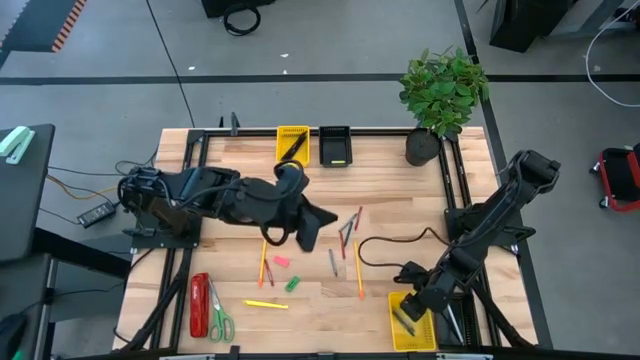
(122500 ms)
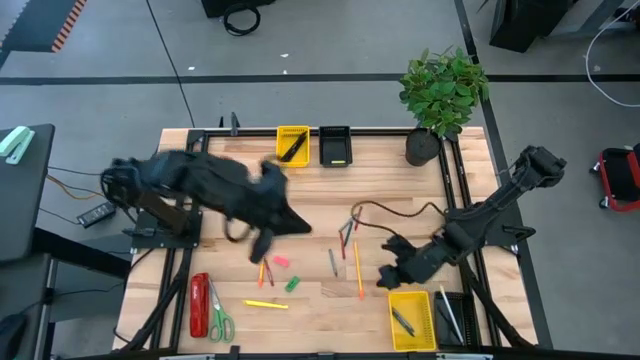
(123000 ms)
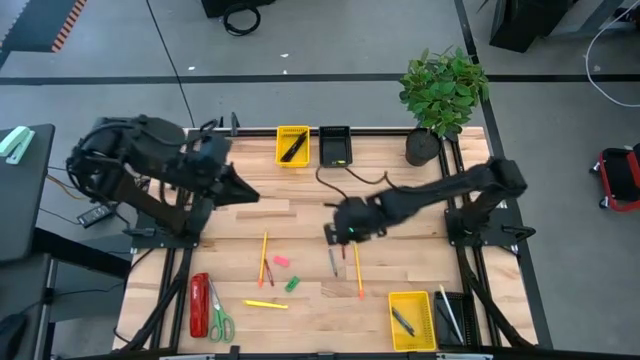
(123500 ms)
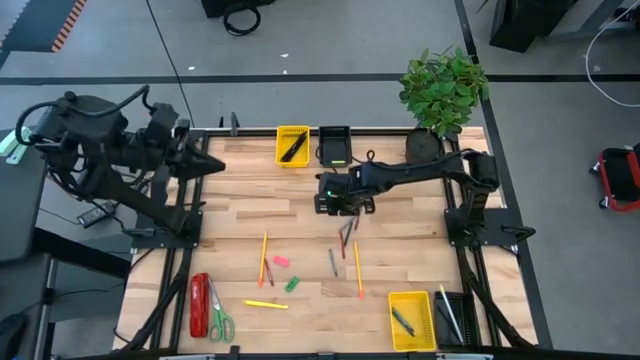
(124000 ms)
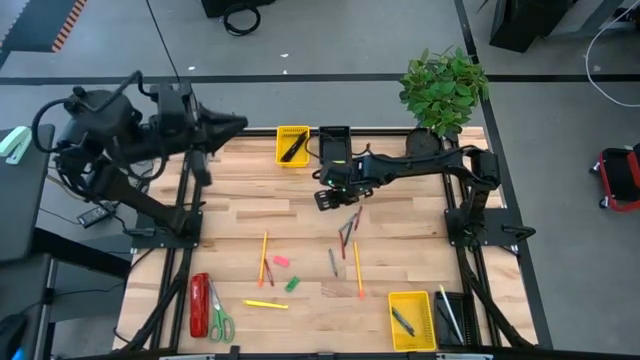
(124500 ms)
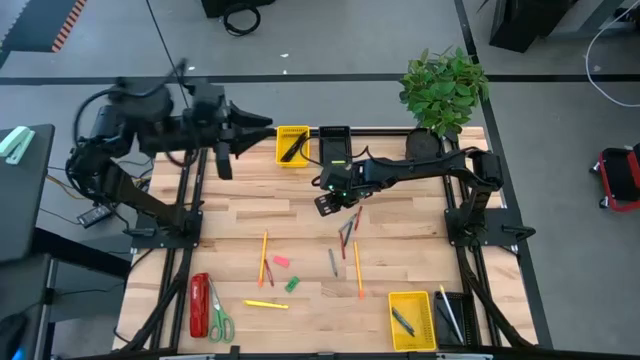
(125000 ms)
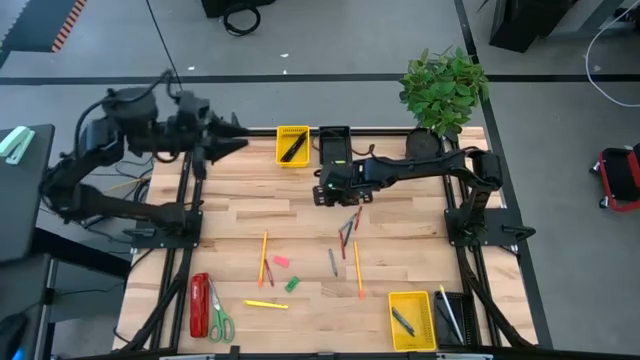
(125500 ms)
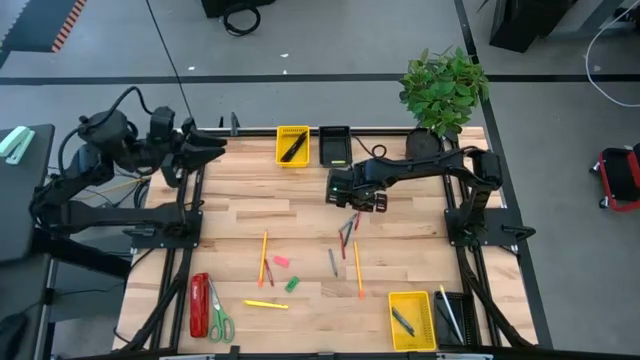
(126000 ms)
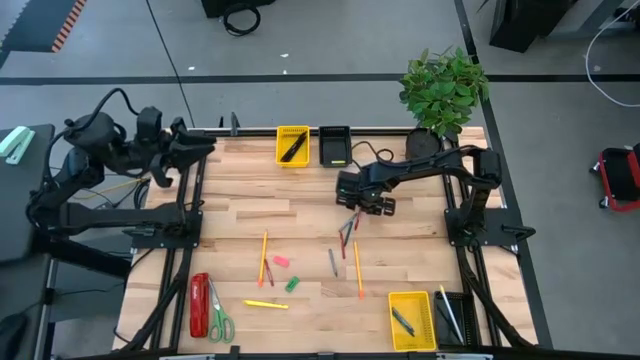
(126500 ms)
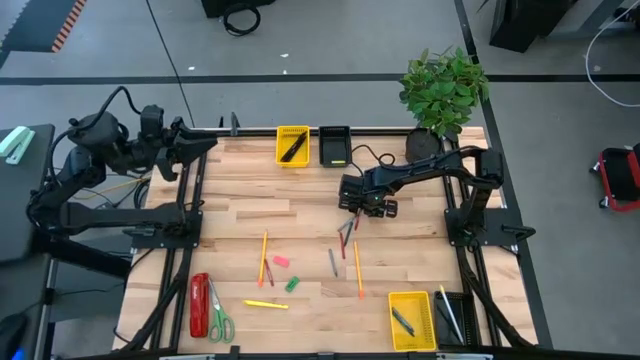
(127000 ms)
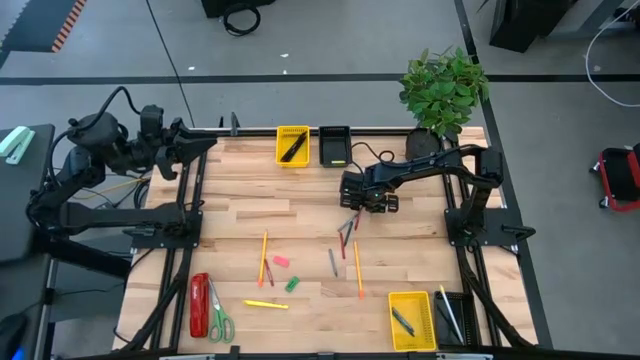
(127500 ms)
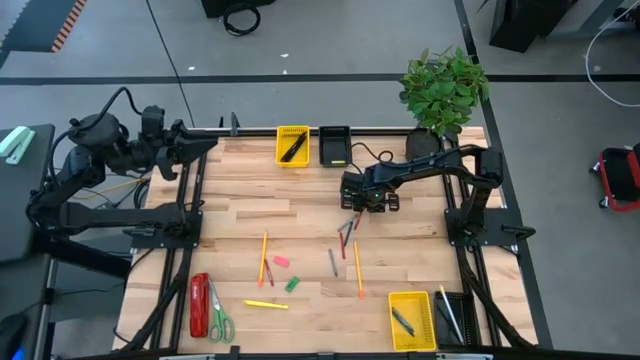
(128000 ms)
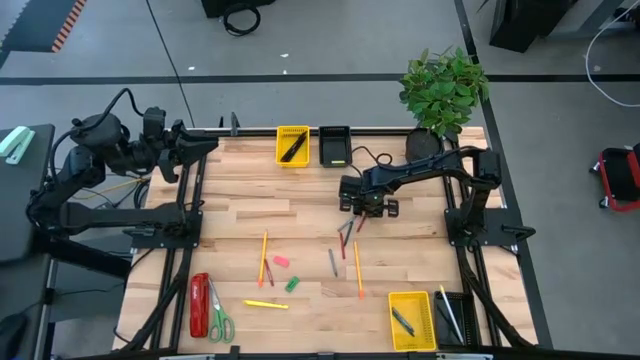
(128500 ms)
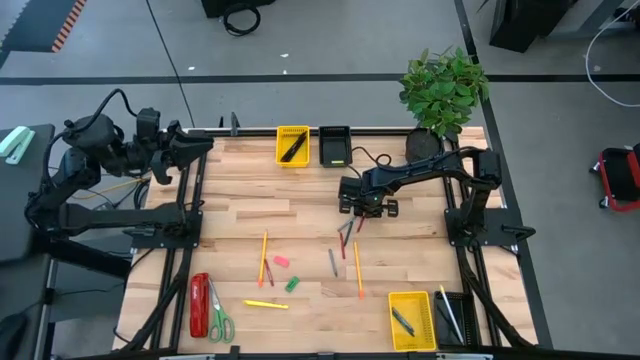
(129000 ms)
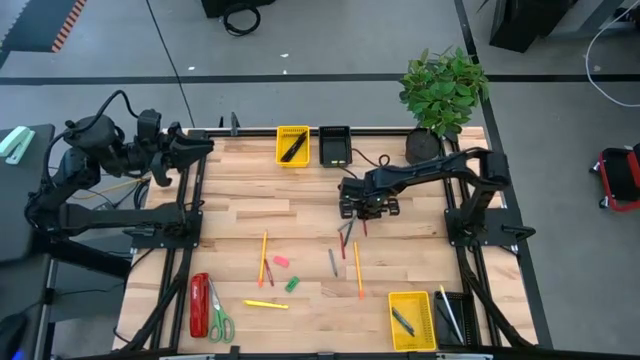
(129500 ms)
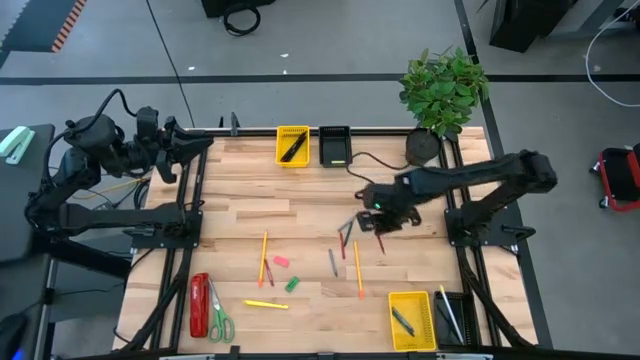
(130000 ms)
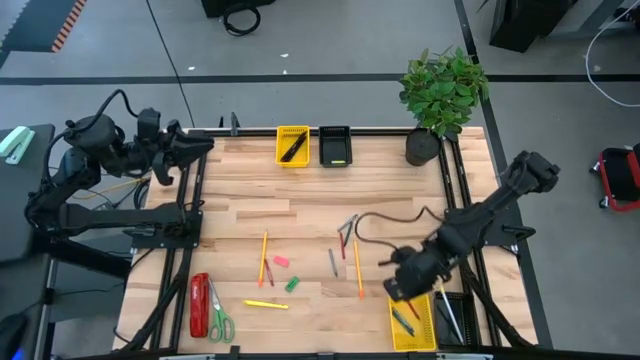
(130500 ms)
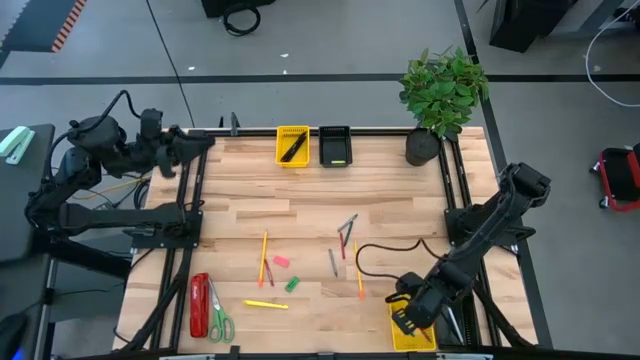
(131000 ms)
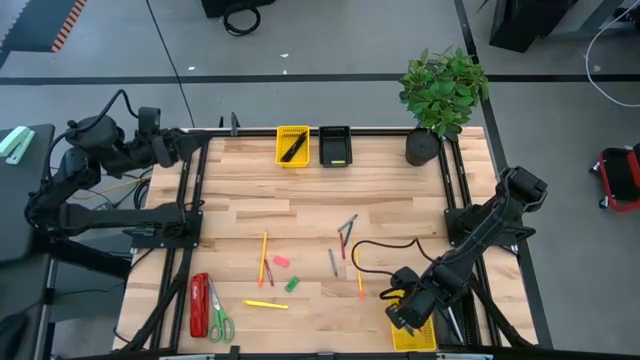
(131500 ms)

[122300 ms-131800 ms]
Task: Sort crayons/erasers/pens/pencils in bins
Put the top red crayon into the bottom yellow bin

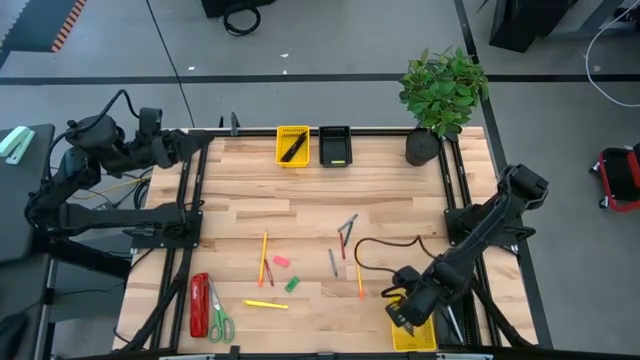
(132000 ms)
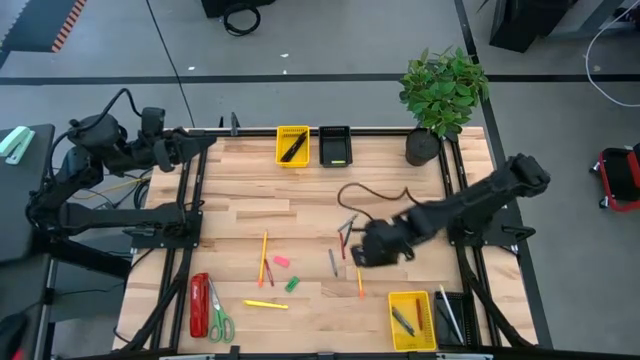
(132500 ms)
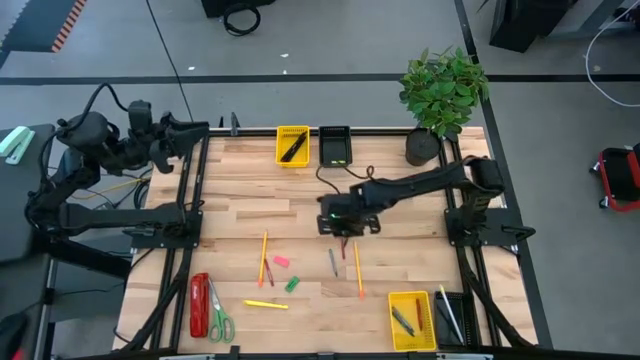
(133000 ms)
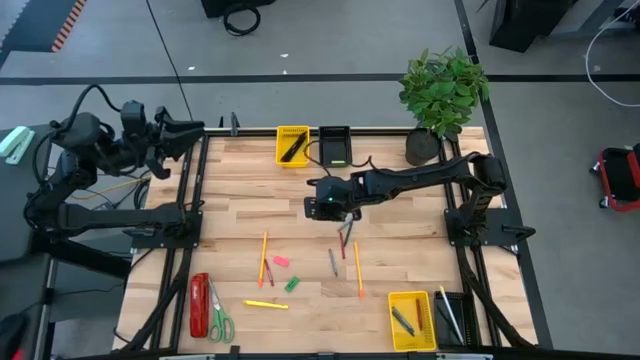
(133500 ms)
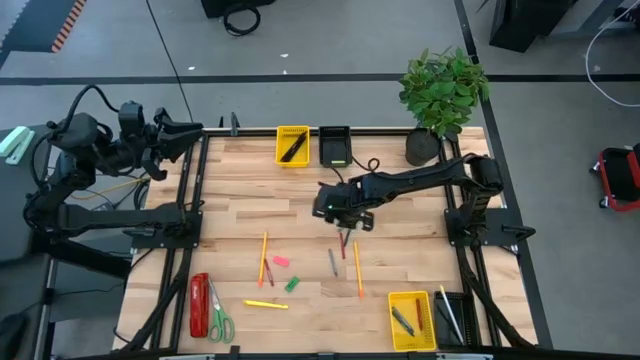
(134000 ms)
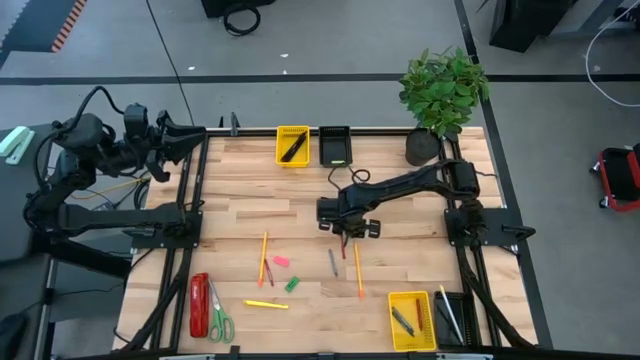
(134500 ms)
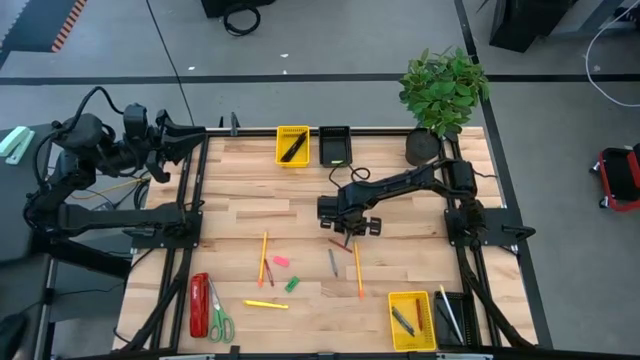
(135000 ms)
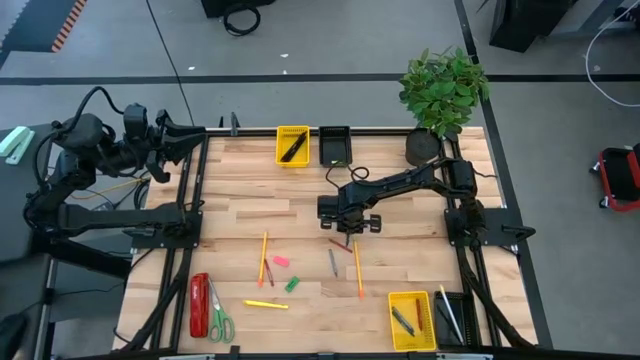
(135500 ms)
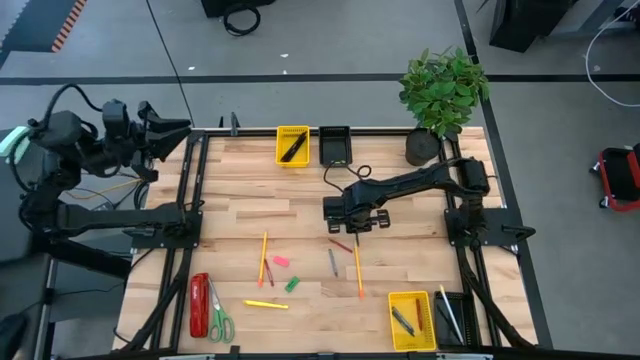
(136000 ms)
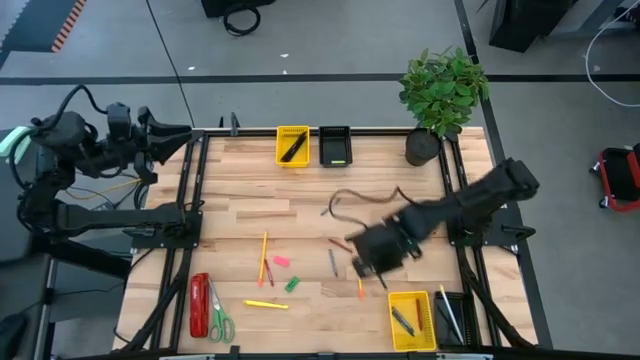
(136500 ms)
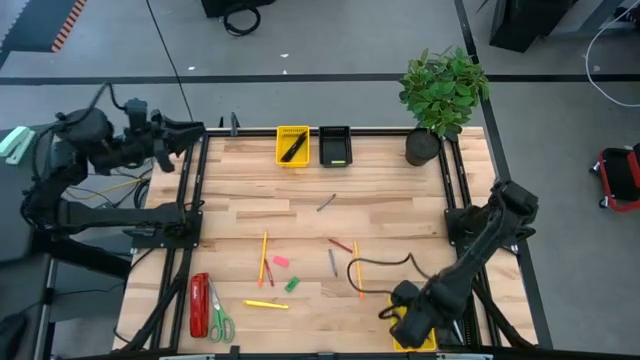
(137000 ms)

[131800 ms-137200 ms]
Put the green crayon into the bottom yellow bin

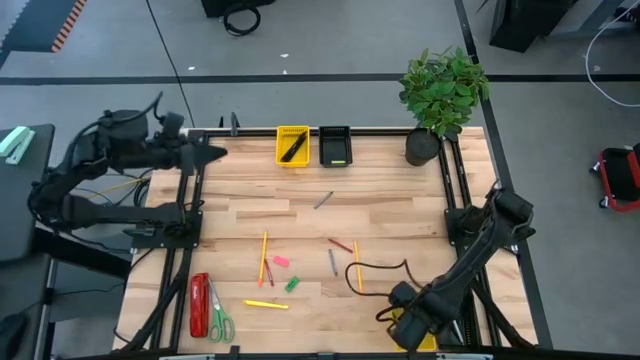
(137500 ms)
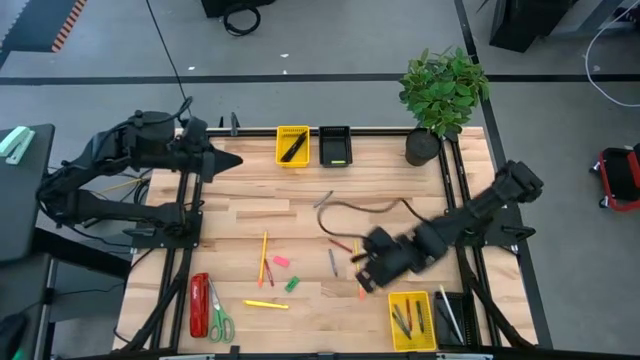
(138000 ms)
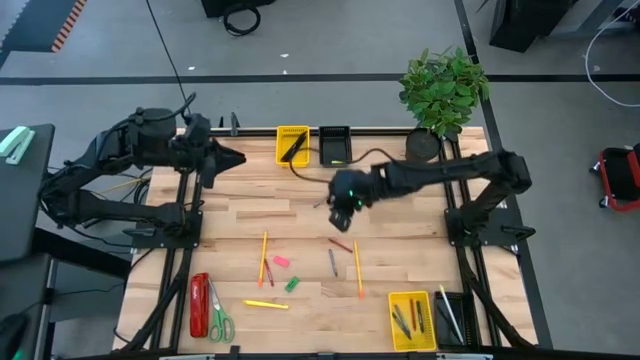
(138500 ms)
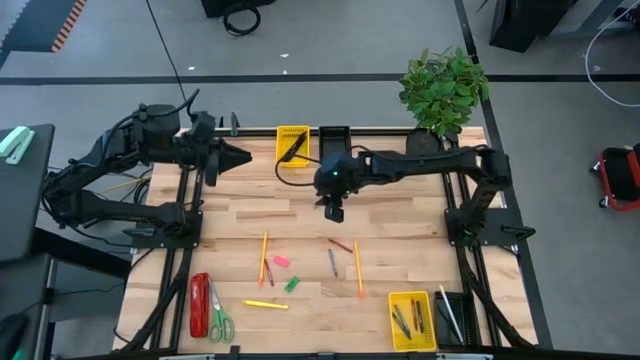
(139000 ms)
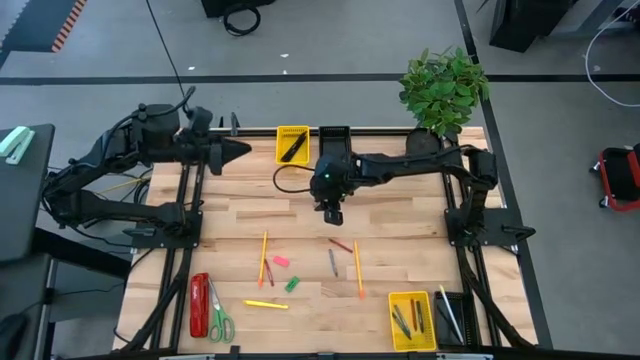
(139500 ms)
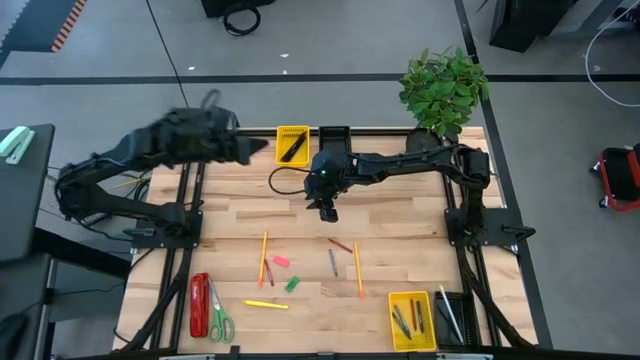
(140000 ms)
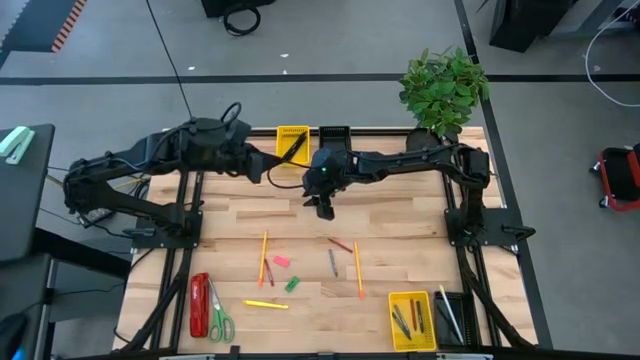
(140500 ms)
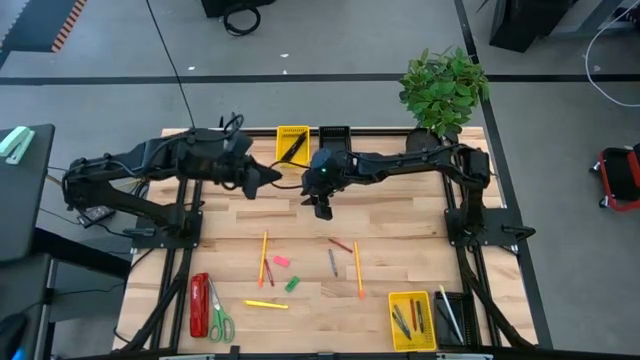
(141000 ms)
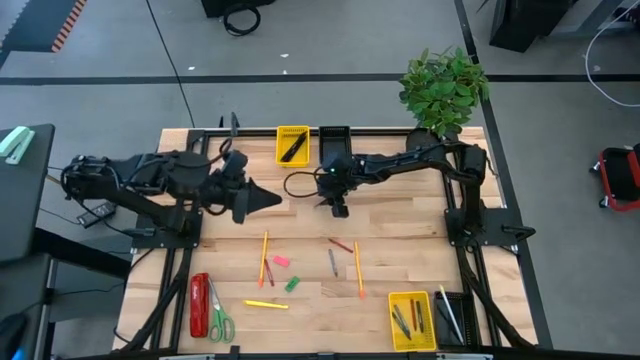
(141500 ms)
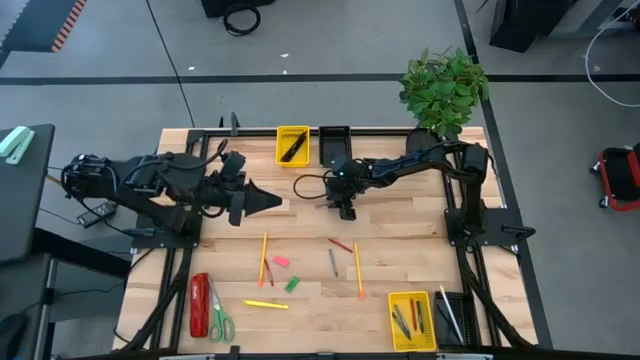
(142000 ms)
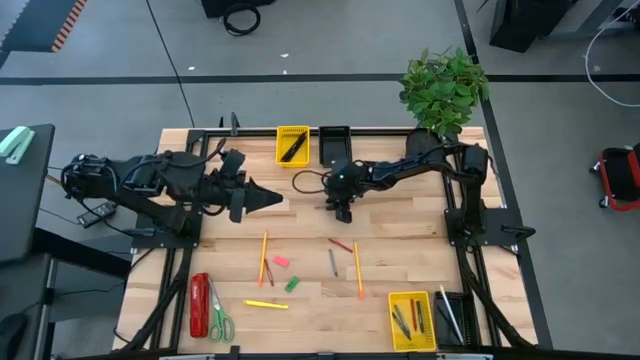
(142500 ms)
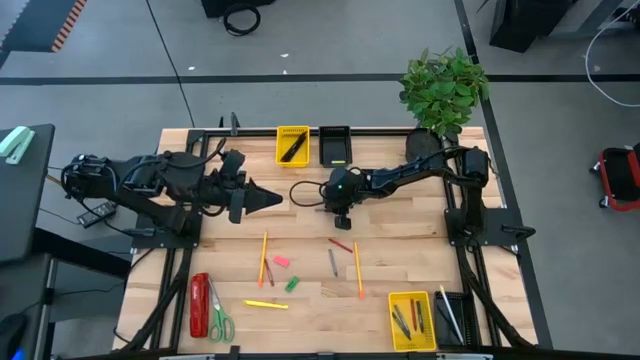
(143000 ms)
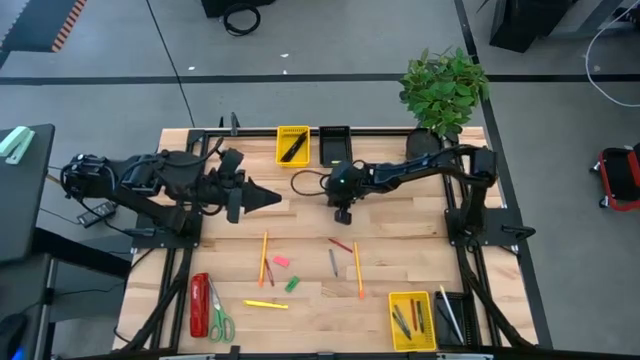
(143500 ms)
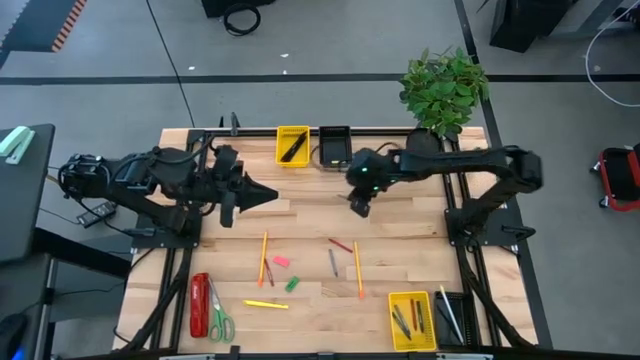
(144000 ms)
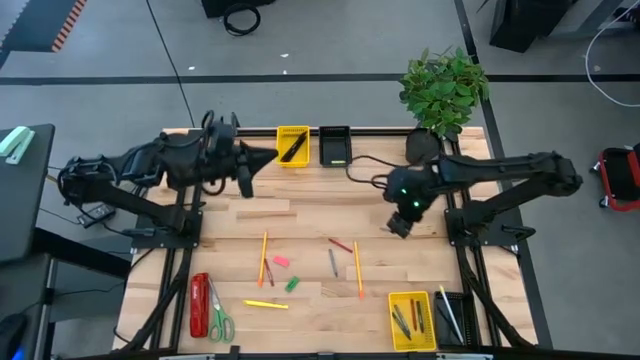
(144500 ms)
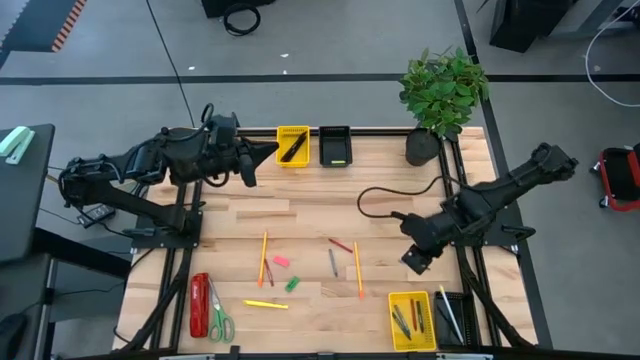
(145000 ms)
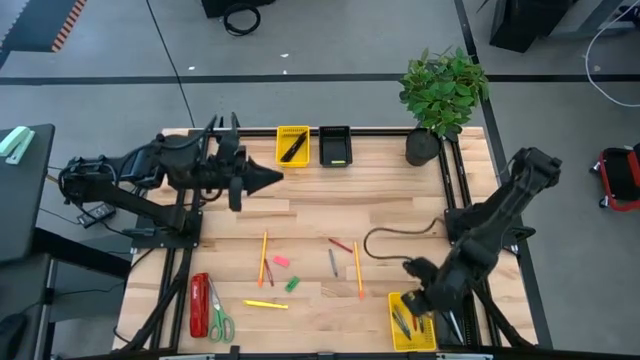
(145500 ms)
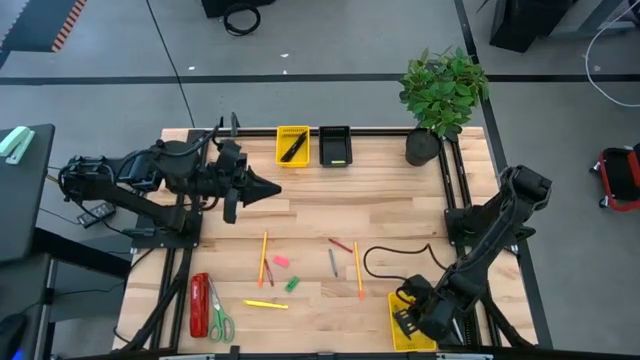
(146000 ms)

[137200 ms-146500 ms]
Put the top gray crayon into the bottom yellow bin
